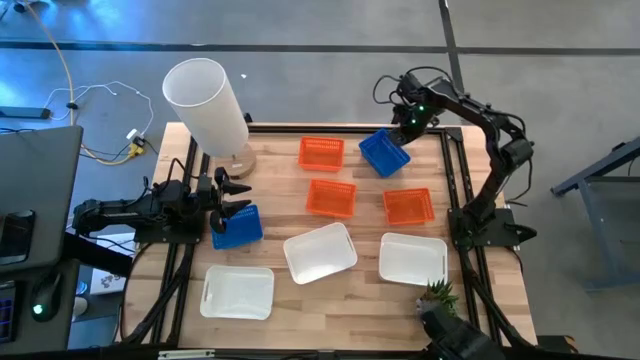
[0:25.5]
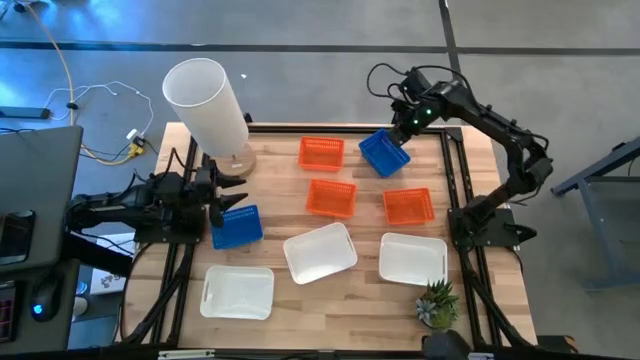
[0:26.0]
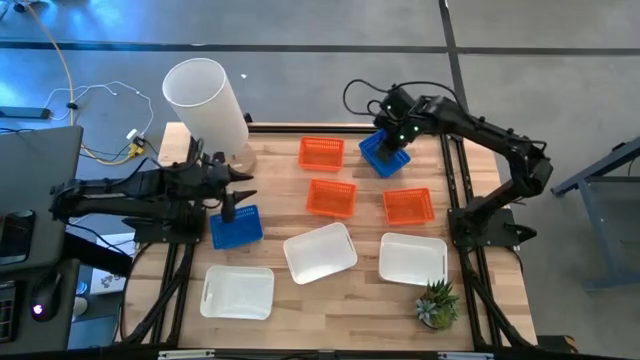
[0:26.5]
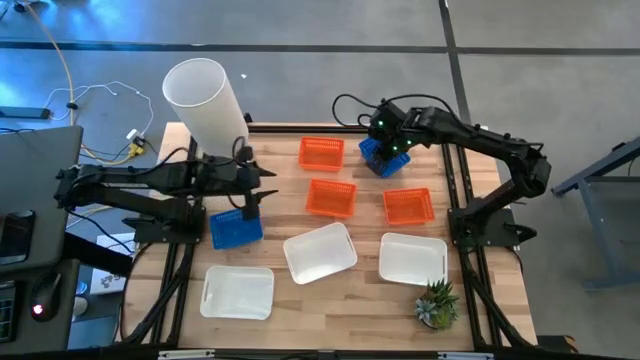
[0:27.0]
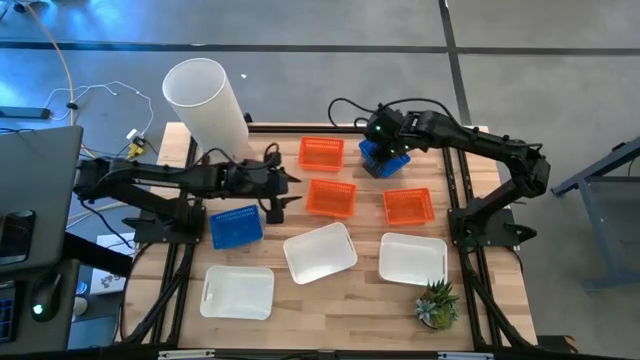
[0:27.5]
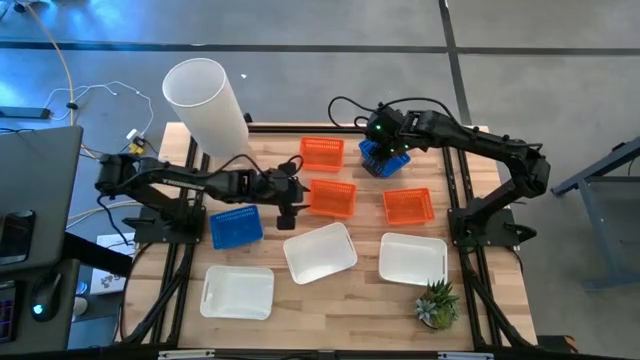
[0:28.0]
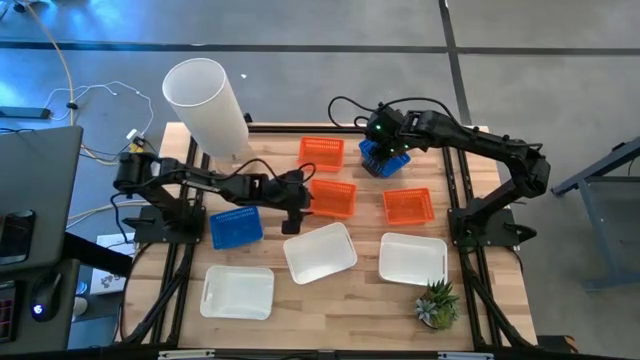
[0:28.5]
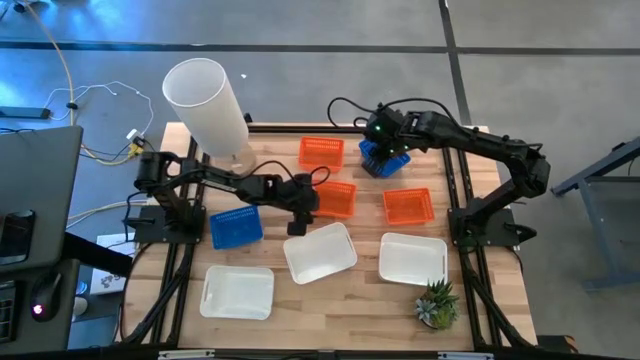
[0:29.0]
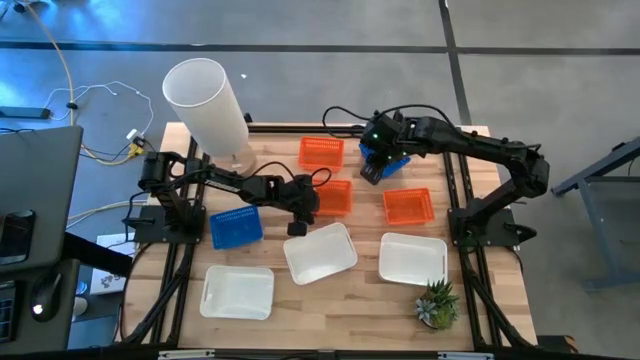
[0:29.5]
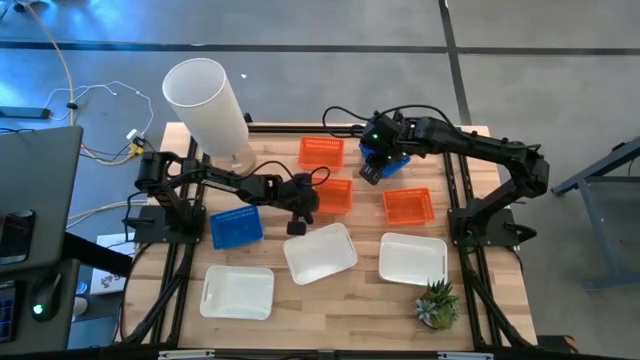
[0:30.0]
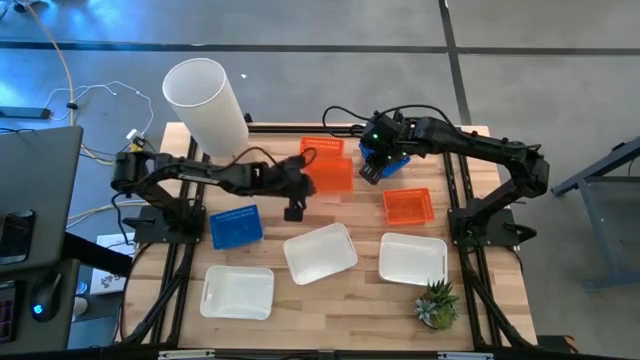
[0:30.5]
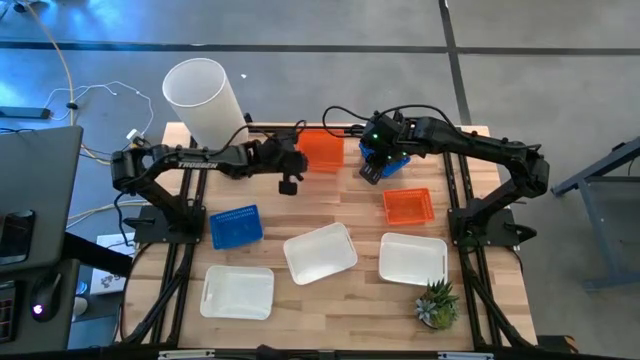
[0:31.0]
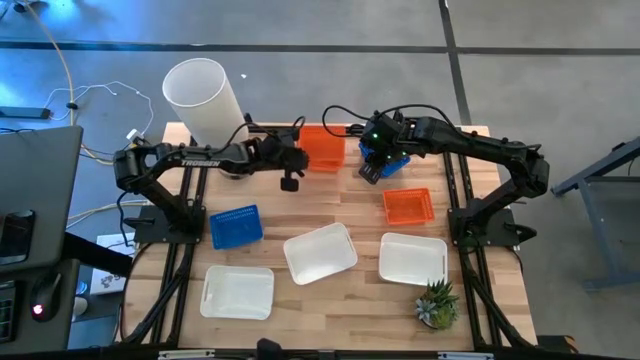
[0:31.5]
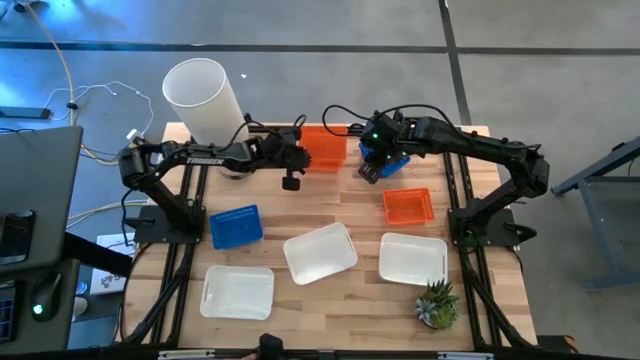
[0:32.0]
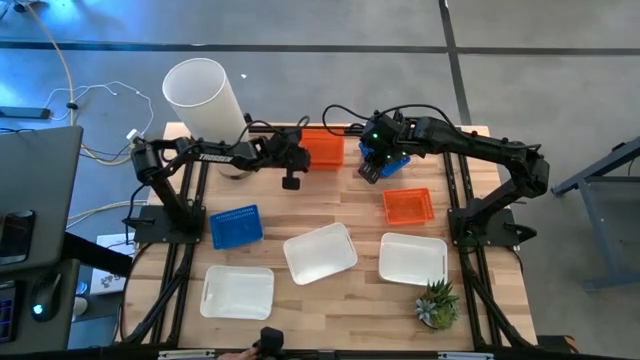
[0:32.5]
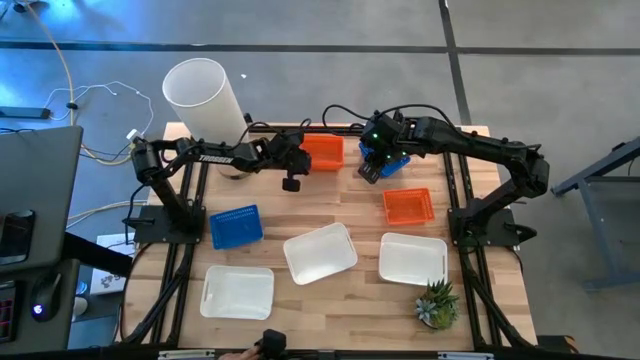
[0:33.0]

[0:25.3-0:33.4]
Stack the bottom left orange bin on top of the other top orange bin

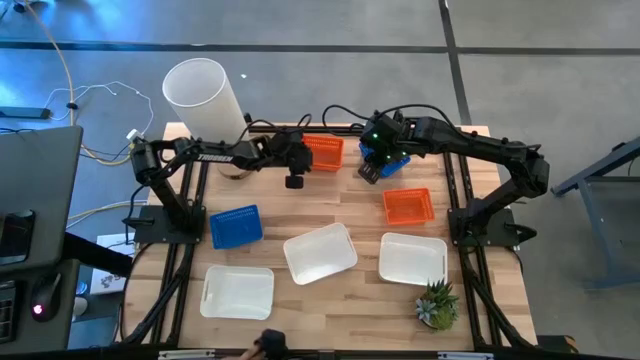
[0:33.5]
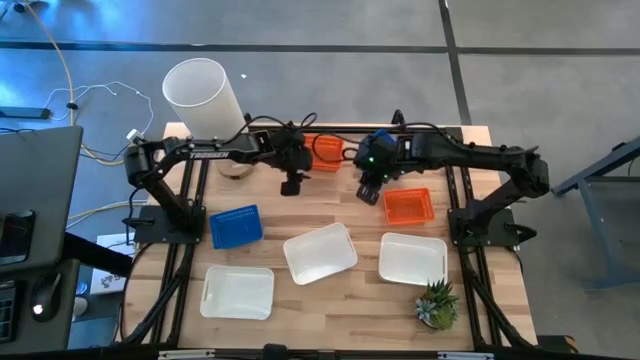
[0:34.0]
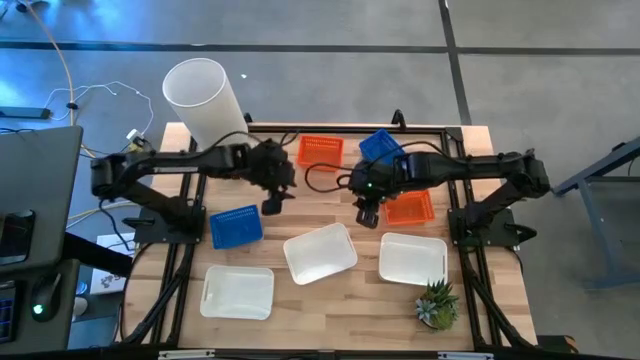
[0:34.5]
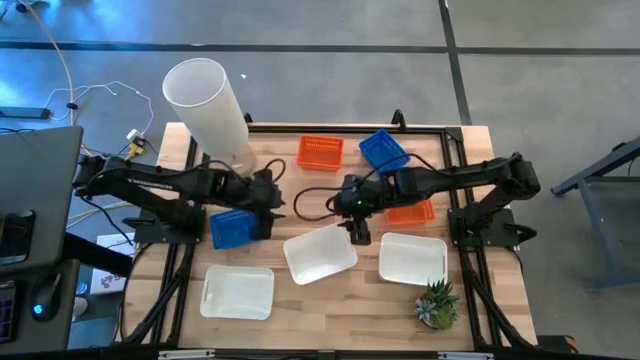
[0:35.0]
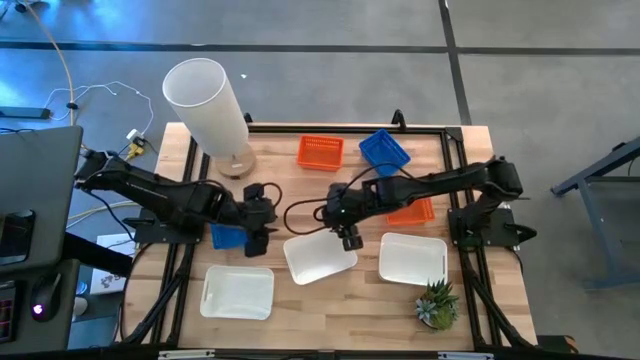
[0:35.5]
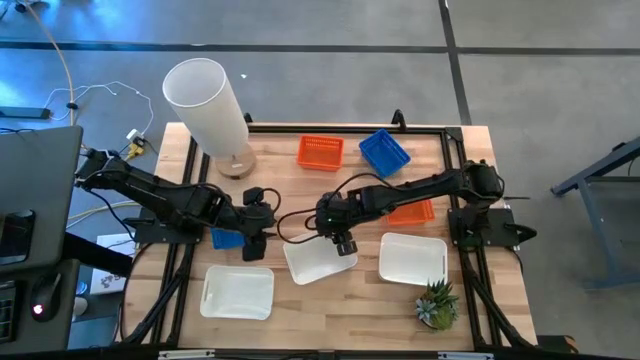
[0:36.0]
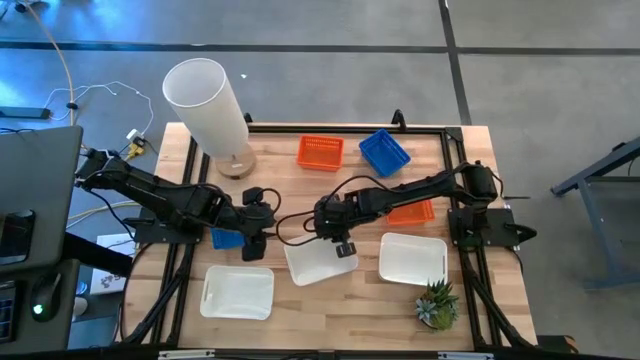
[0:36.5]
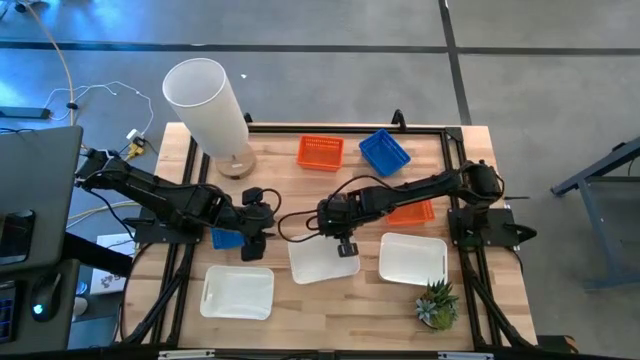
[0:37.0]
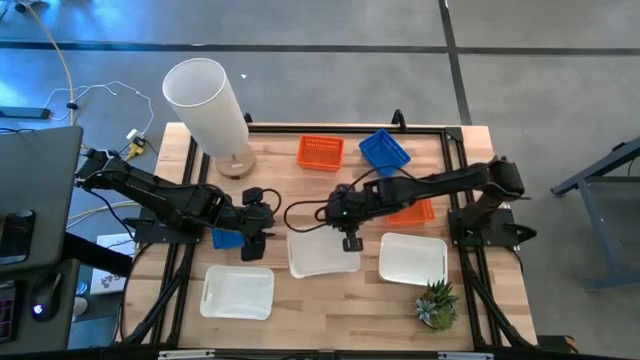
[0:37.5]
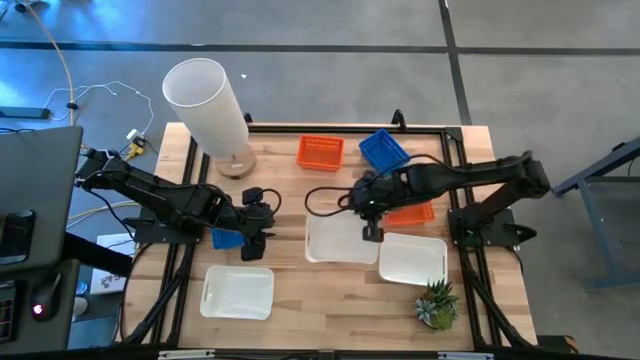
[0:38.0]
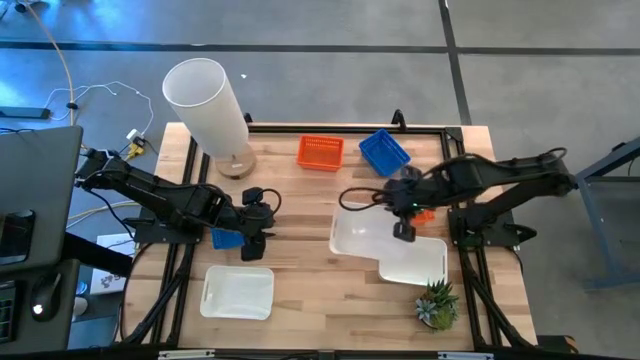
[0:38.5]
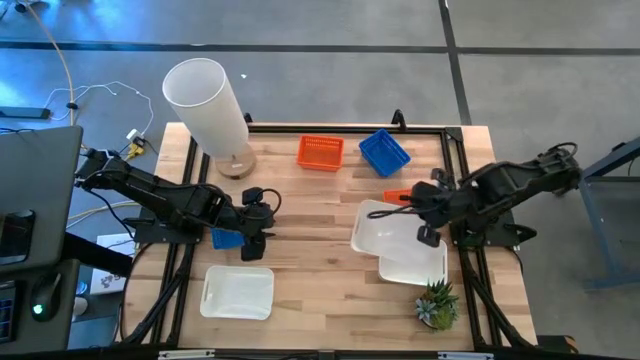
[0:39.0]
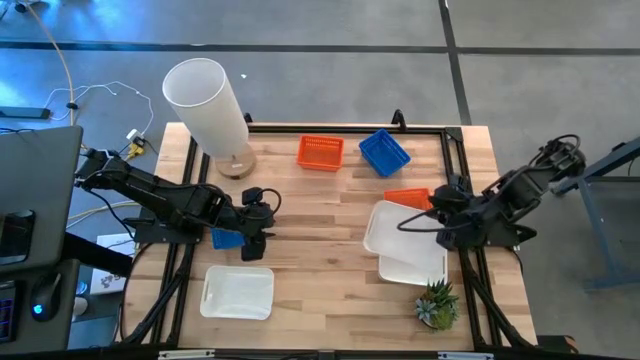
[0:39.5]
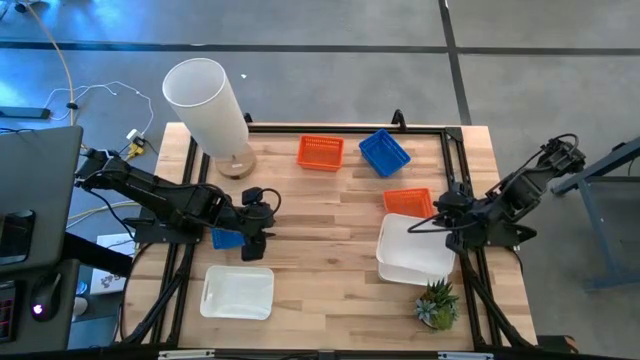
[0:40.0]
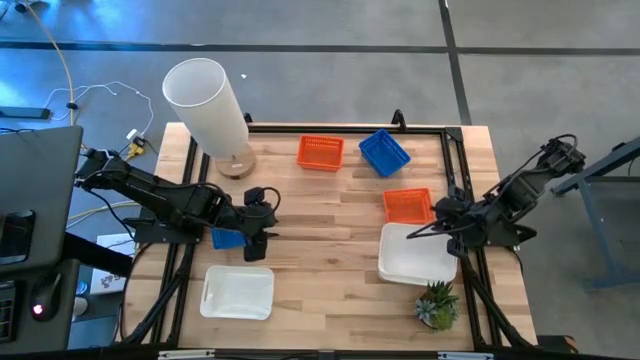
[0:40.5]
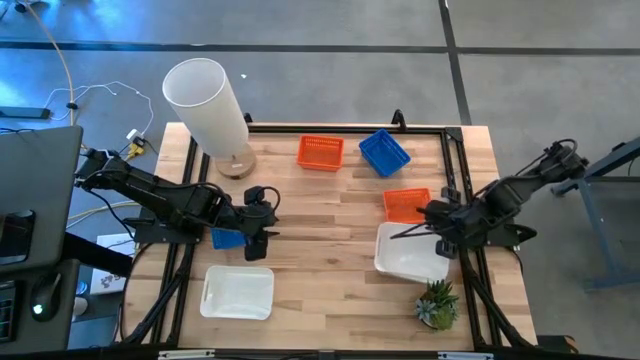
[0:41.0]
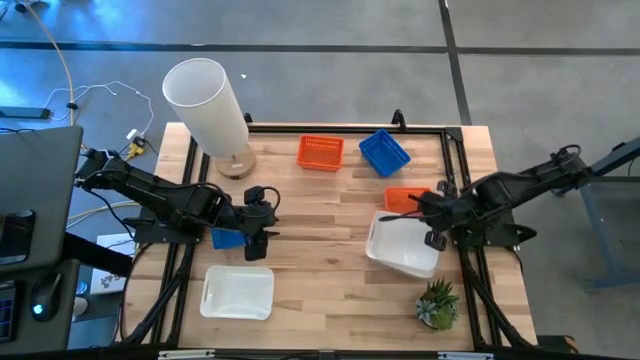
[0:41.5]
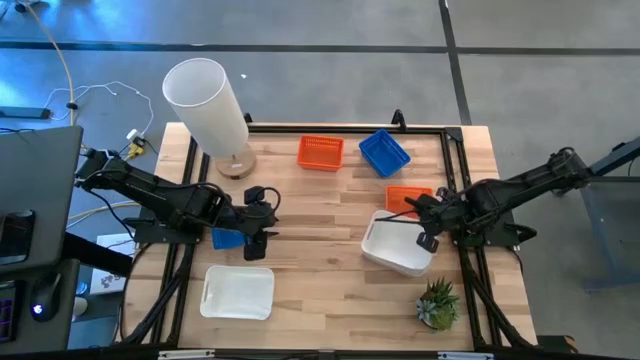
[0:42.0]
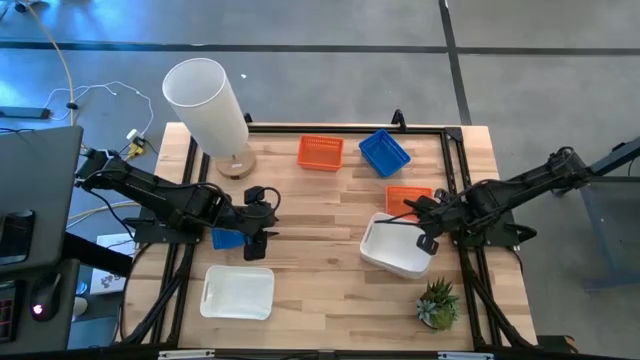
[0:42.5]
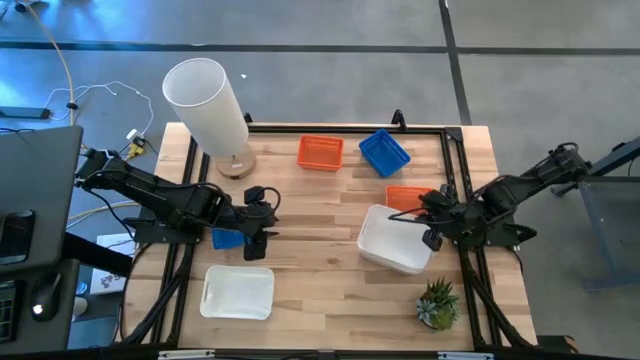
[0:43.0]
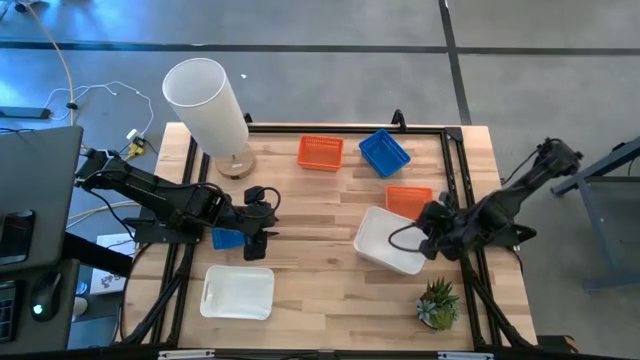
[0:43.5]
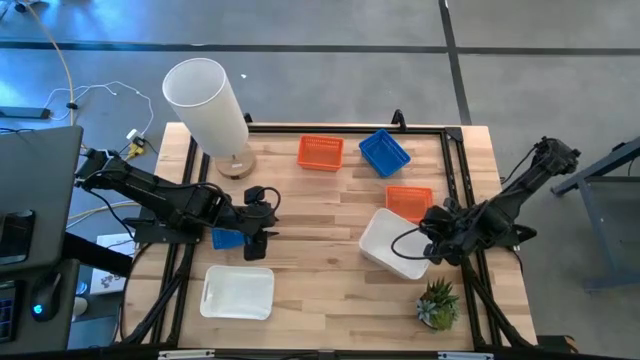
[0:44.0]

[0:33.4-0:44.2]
Stack the middle white bin on top of the other right white bin

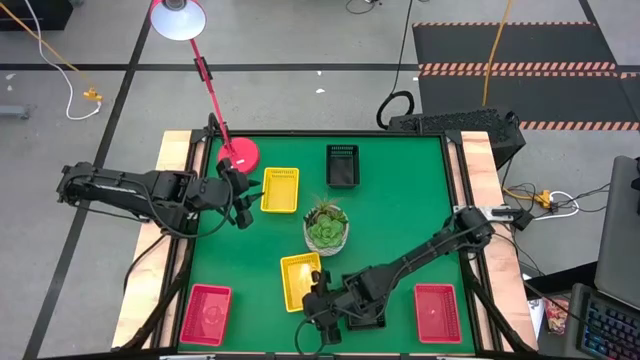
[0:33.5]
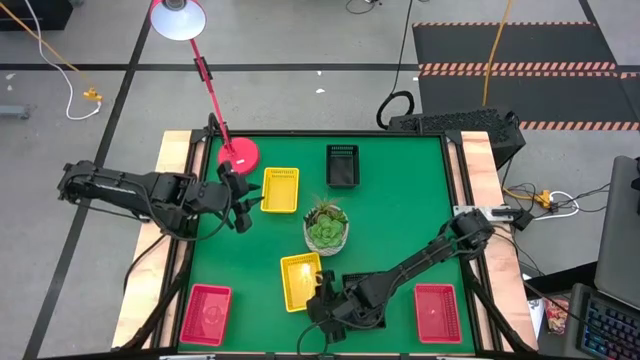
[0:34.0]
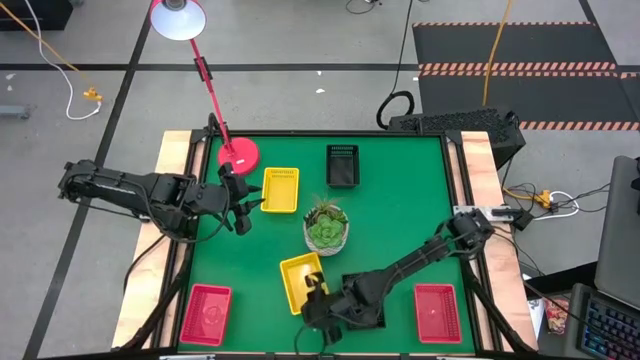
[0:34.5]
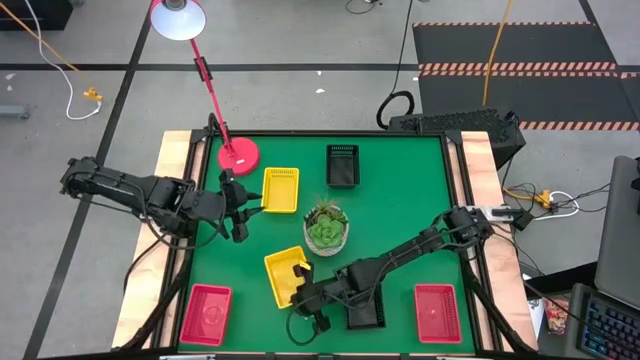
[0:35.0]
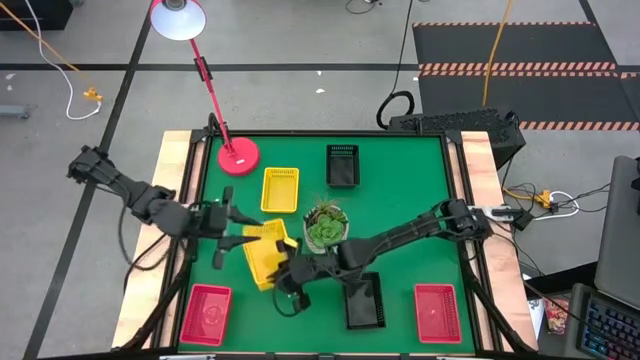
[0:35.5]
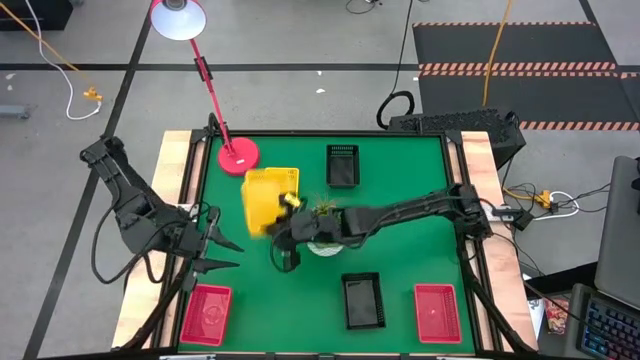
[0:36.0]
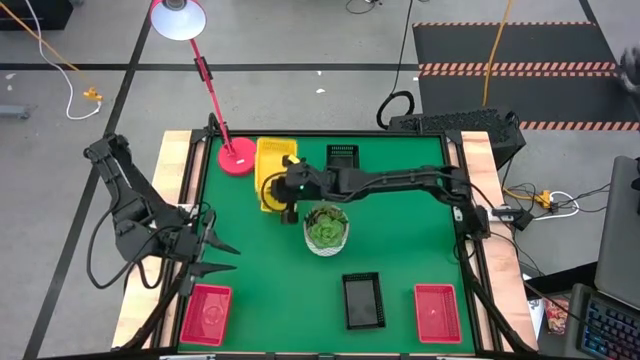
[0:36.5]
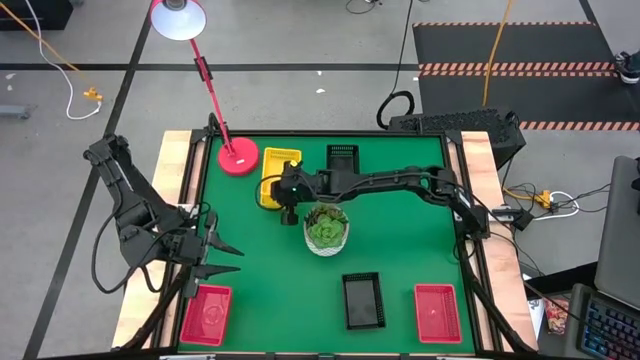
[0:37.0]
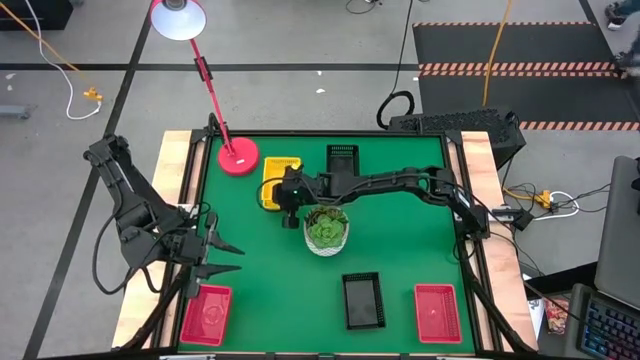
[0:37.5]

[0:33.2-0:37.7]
Stack the stacked yellow bins on top of the top yellow bin
